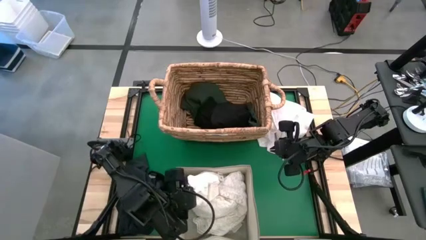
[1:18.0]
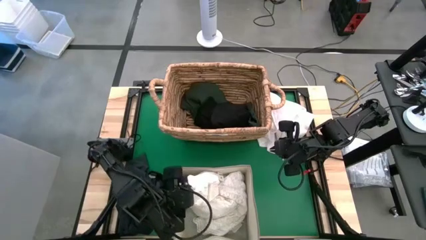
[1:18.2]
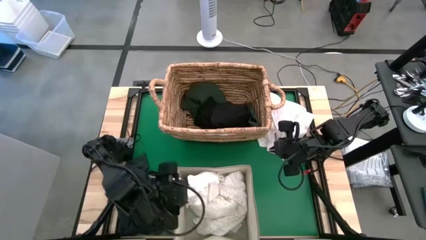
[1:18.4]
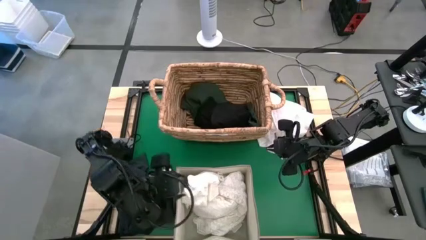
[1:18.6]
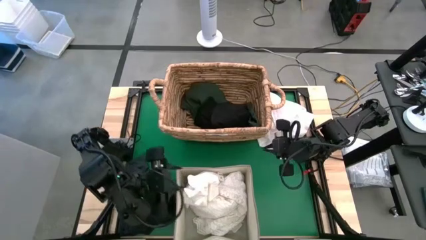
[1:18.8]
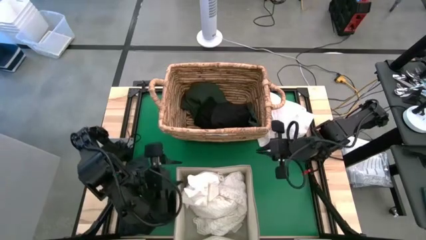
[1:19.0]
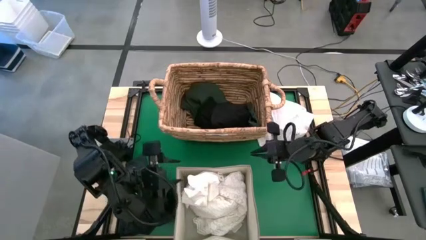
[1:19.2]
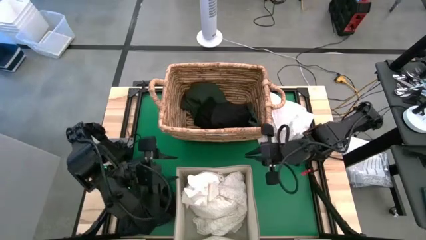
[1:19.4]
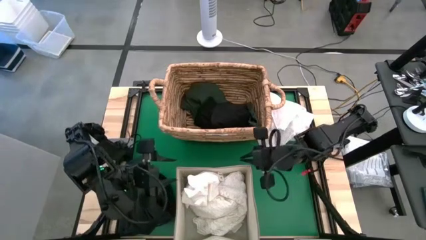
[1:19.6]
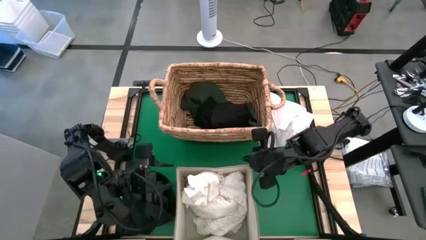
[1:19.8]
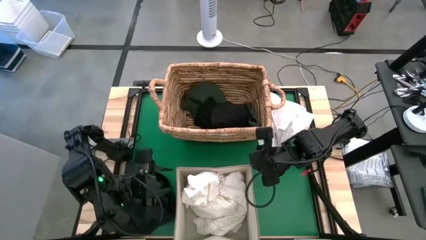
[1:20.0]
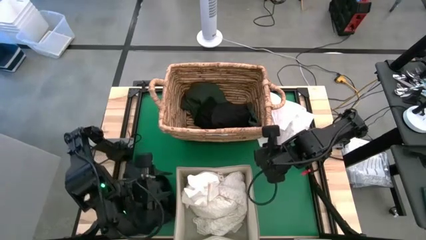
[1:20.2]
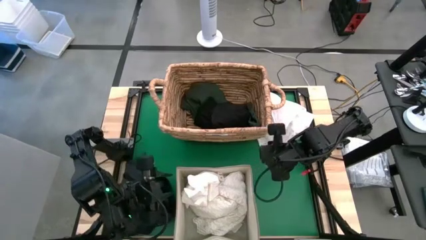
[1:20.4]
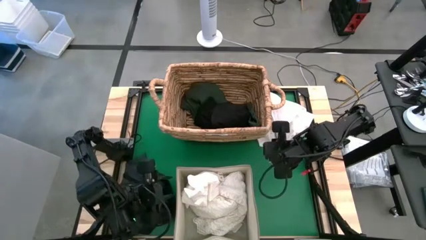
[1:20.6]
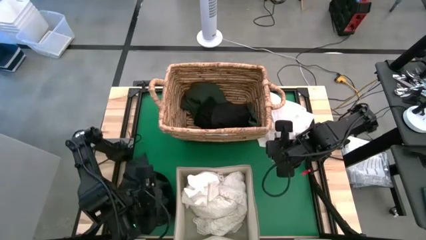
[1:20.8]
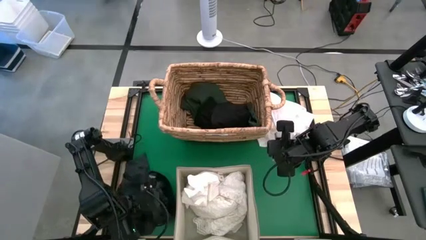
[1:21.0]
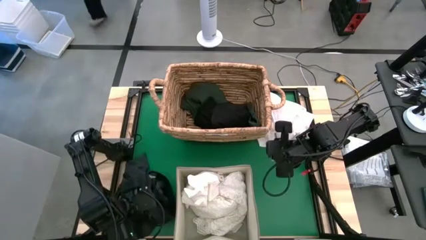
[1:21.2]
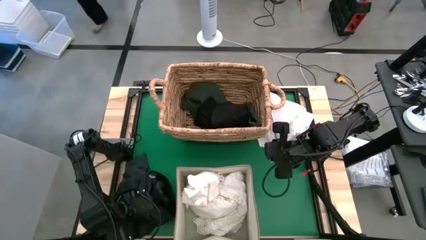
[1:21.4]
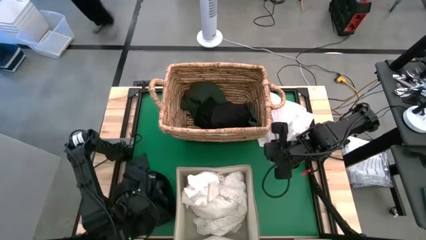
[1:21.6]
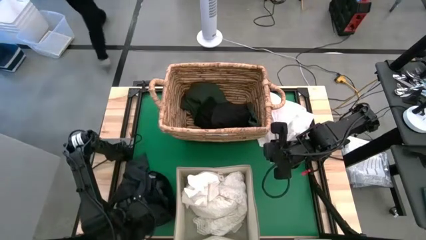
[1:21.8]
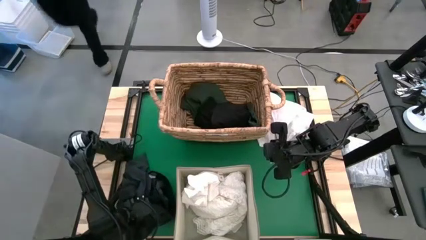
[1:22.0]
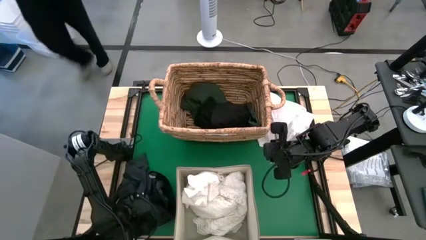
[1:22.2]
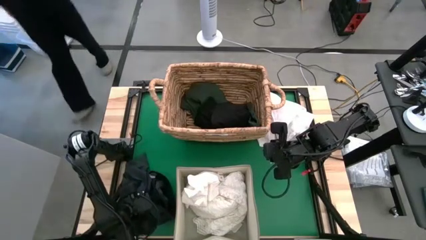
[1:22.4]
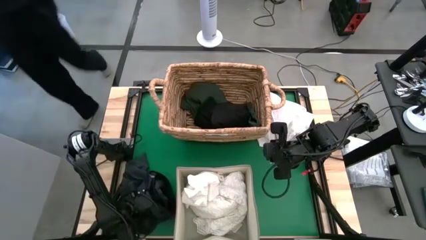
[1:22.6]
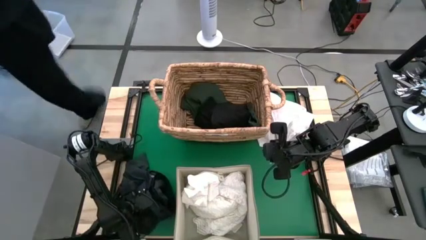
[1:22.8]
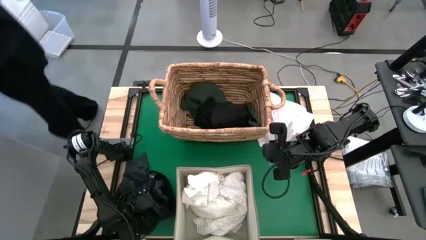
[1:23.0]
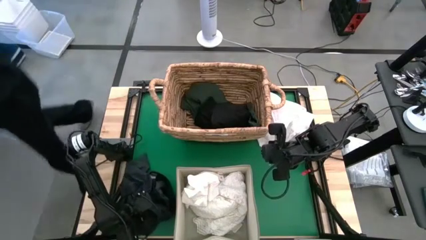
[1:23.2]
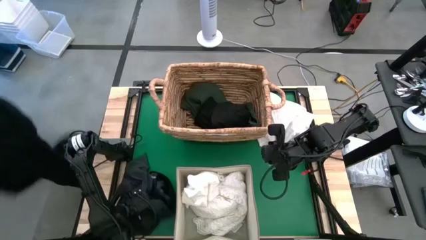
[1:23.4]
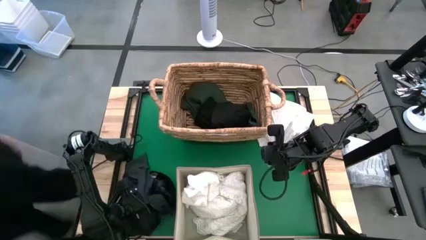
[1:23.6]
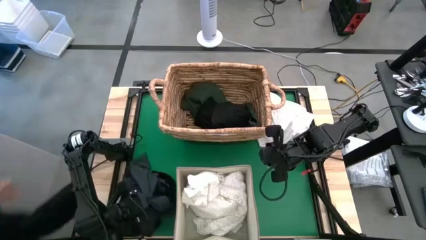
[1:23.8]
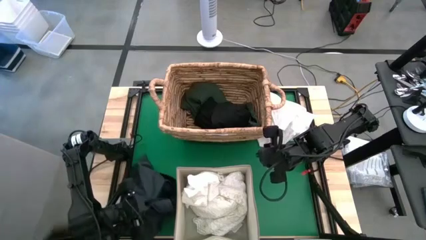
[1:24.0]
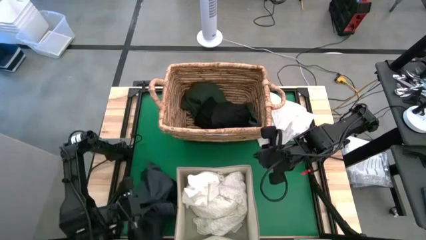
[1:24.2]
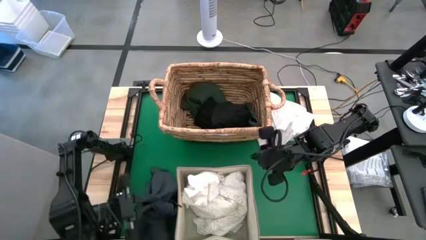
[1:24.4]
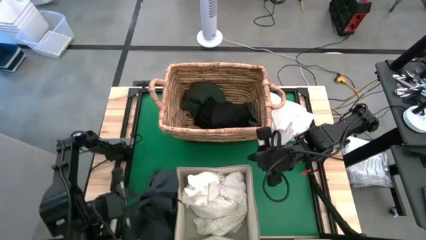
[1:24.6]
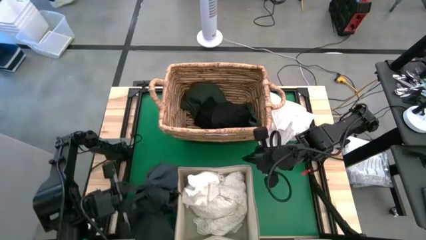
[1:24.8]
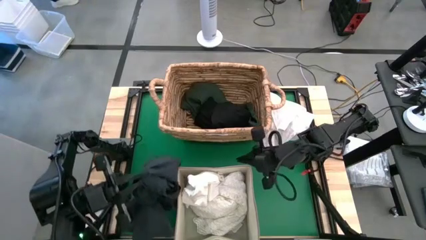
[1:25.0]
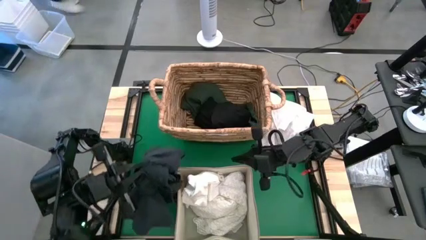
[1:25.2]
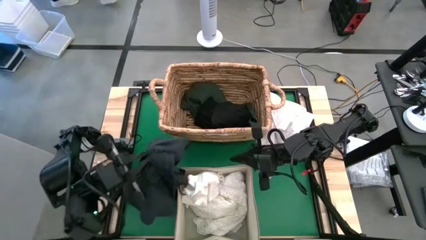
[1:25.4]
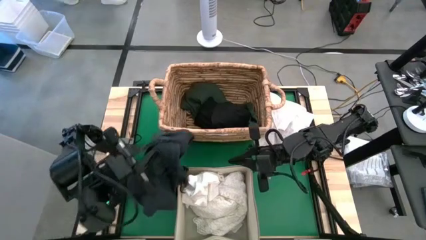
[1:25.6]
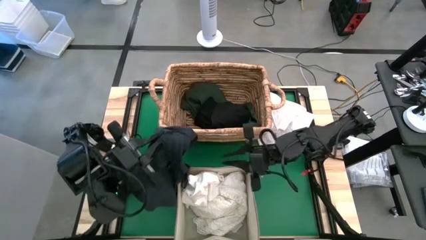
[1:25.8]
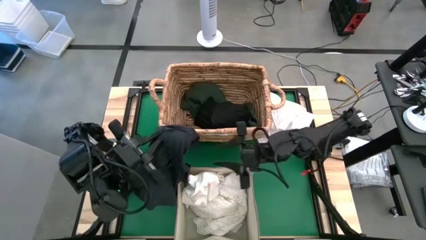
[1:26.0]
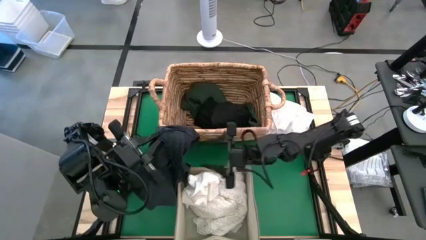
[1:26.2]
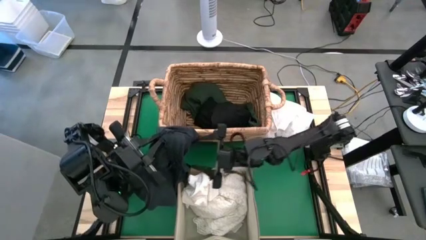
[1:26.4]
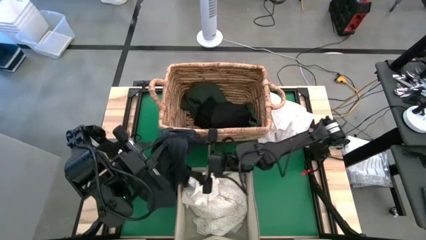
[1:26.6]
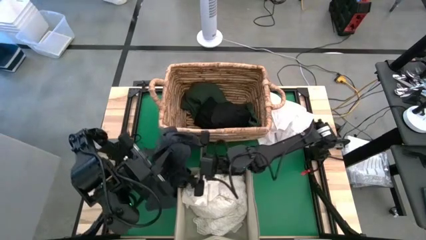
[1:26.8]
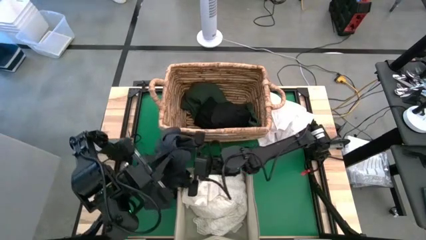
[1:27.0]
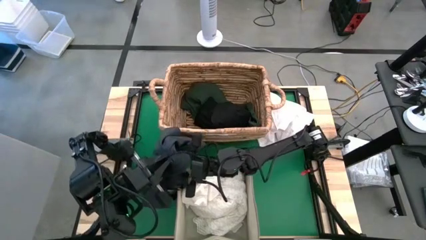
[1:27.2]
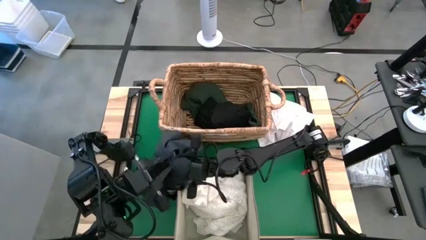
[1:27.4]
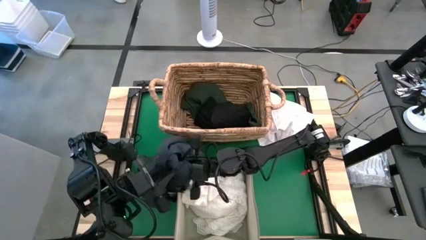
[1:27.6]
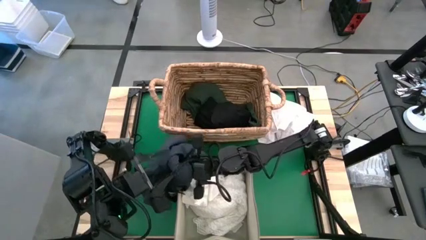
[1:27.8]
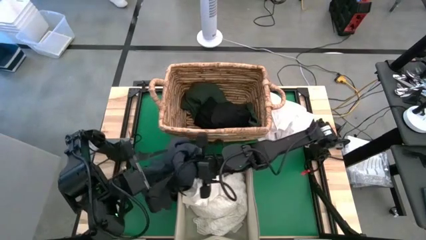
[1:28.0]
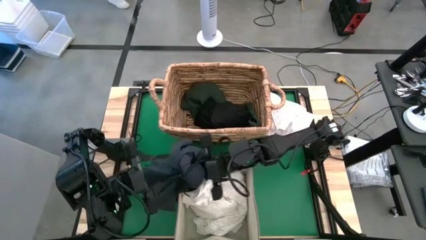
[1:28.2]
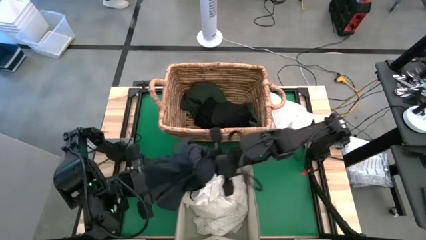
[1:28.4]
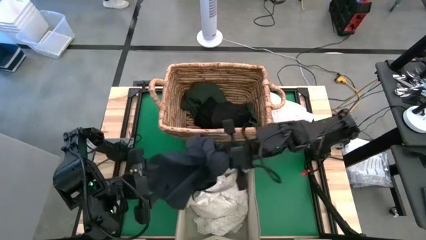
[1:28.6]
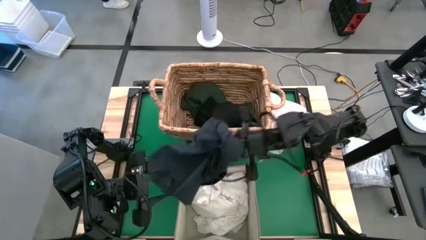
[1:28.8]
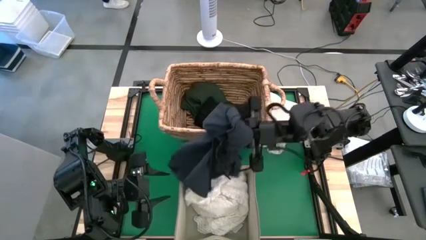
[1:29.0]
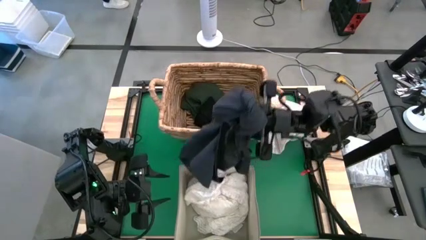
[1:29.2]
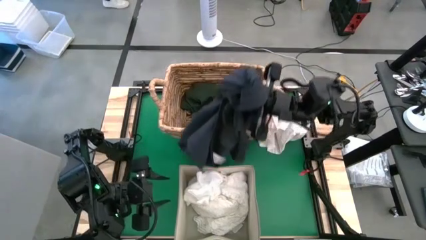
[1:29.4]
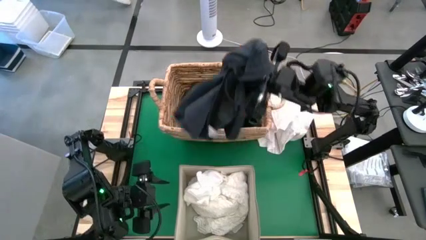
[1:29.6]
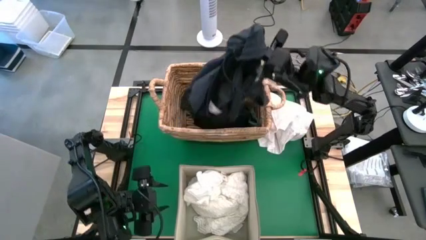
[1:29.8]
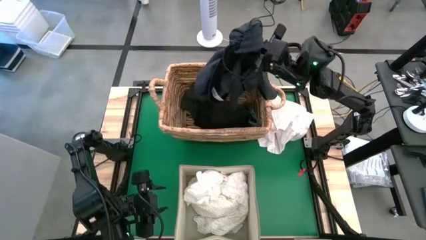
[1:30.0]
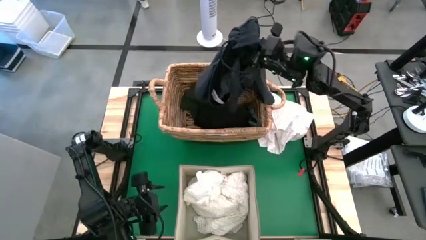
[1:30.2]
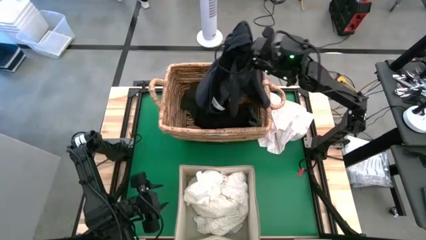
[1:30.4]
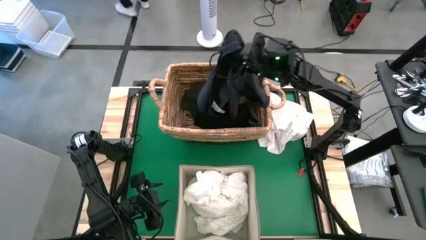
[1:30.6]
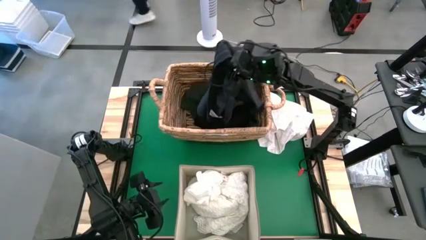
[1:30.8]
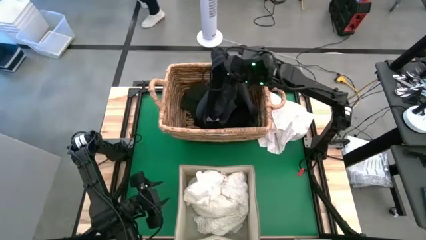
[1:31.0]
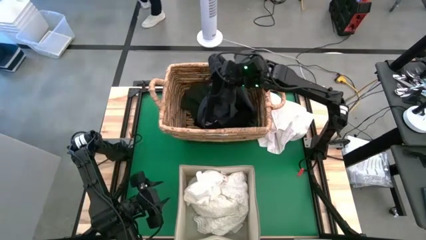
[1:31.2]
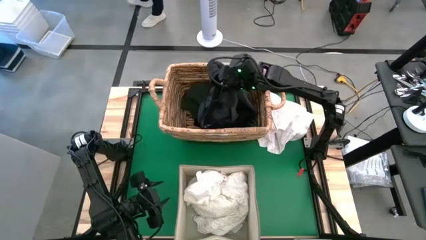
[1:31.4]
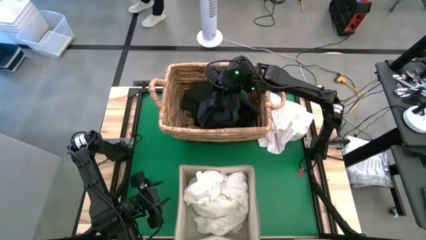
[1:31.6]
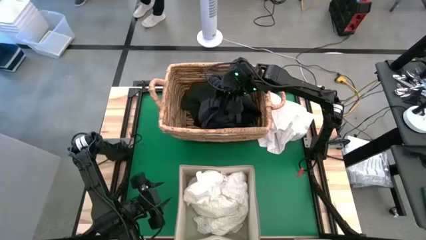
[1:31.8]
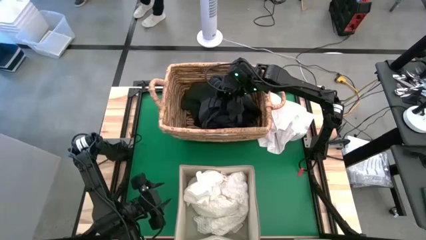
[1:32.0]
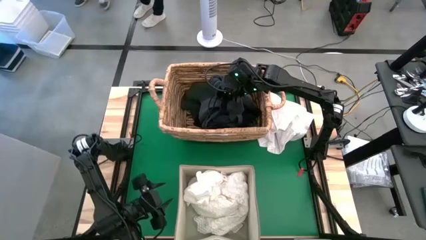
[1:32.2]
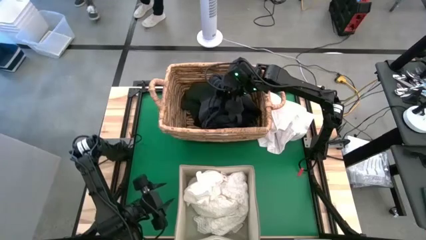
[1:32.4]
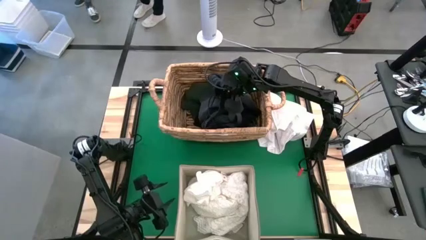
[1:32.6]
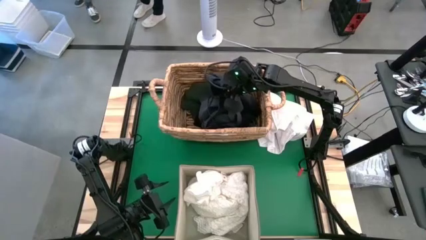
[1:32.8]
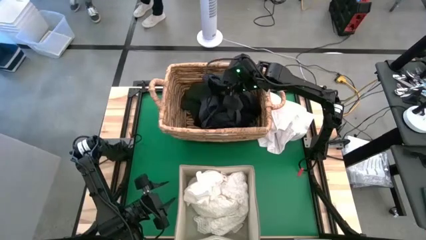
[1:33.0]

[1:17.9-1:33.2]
Put the black shorts into the brown basket

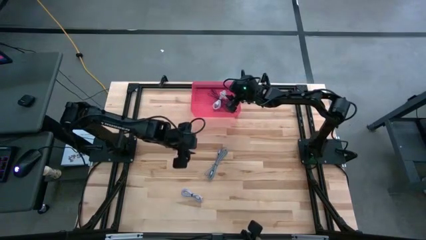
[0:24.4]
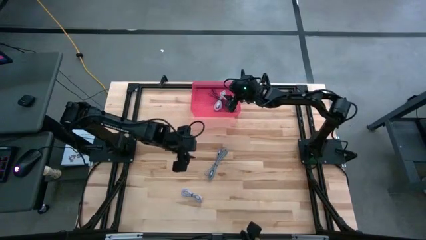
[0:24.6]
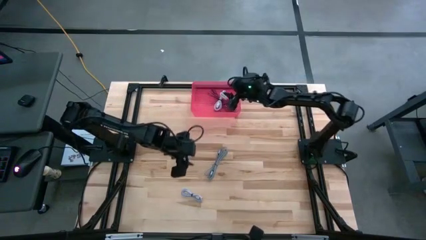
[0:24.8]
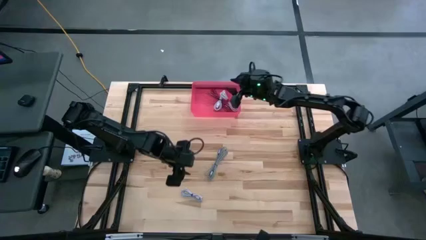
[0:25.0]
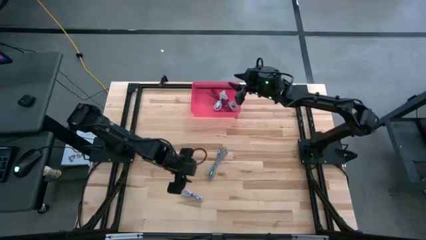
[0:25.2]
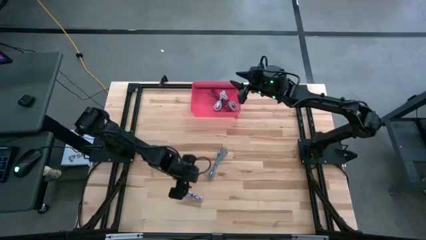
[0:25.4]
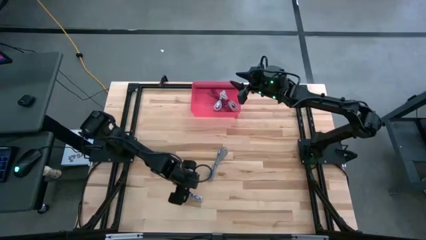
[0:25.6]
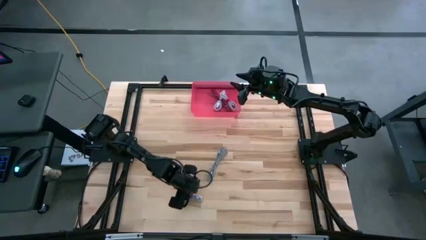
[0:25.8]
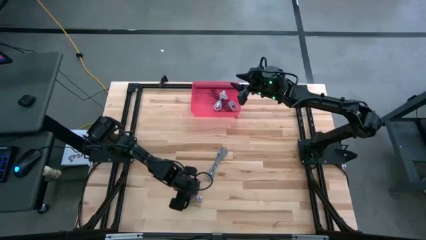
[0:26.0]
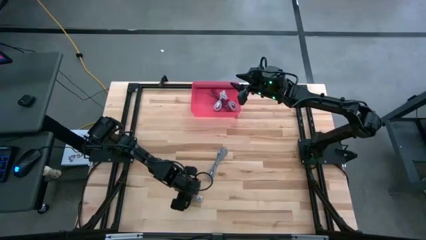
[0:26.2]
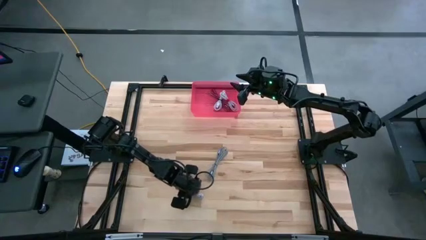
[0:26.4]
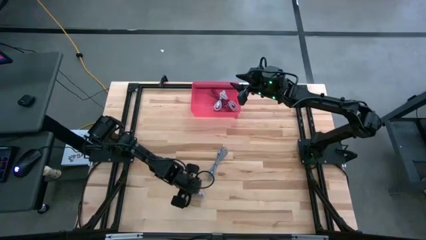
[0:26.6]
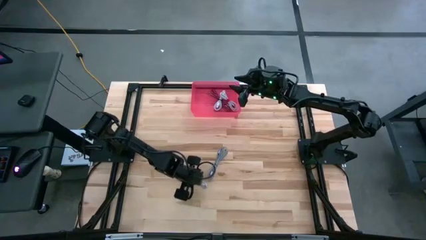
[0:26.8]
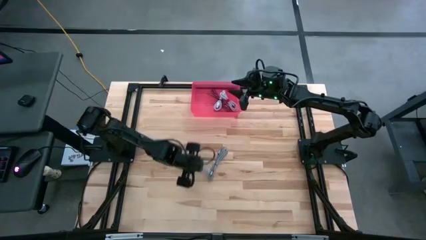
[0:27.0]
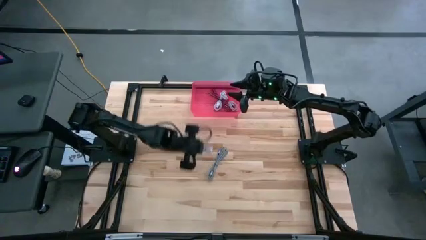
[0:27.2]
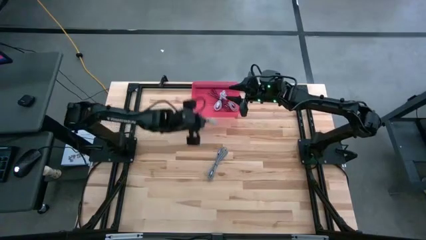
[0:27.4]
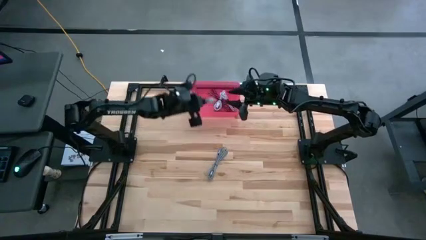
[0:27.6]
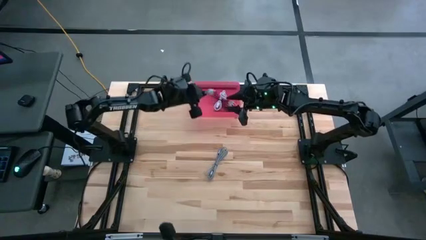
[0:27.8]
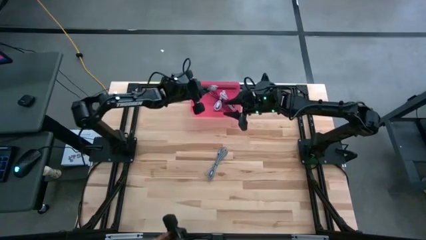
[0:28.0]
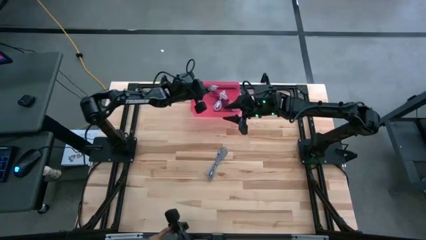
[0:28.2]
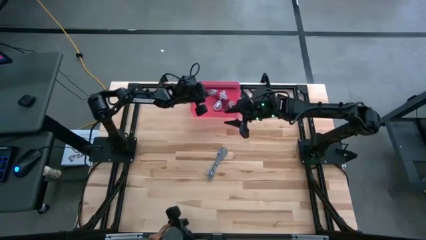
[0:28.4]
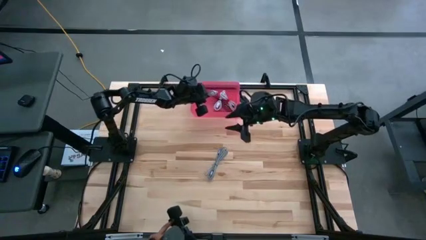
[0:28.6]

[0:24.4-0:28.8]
Put the purple charger cable into the pink bin
